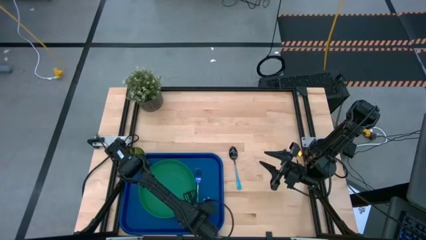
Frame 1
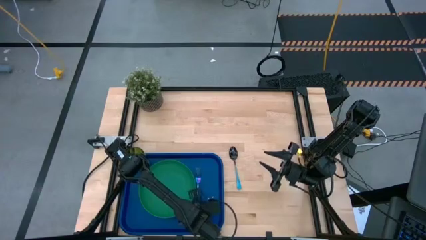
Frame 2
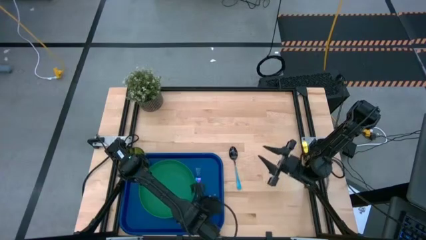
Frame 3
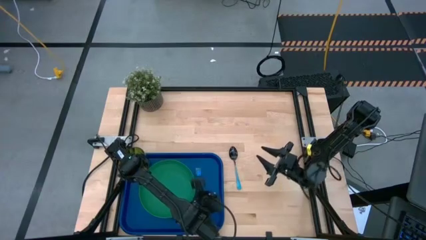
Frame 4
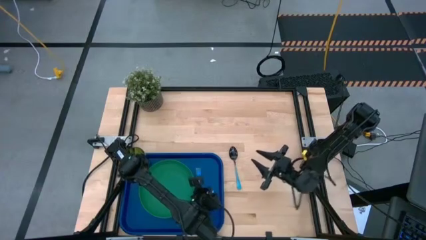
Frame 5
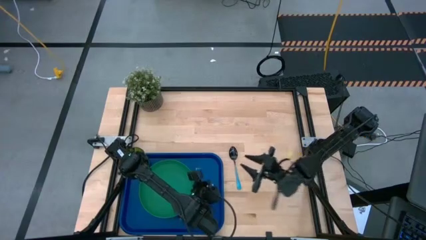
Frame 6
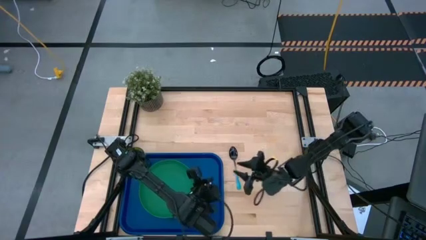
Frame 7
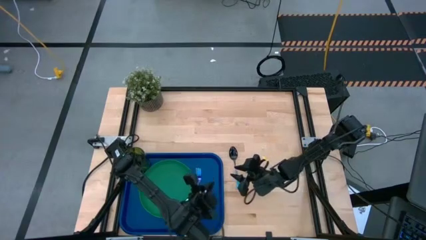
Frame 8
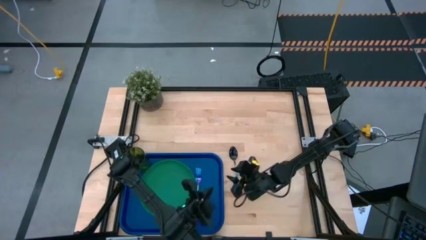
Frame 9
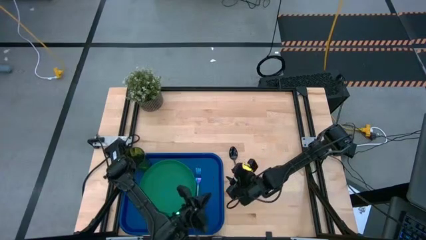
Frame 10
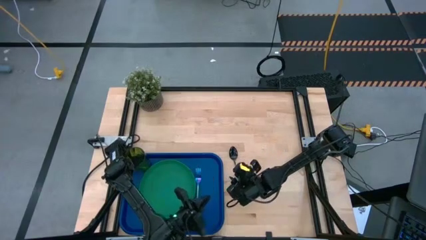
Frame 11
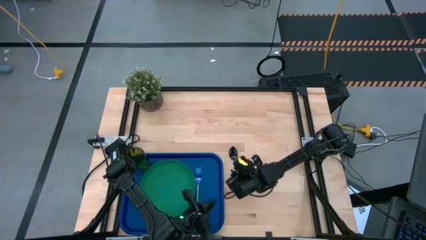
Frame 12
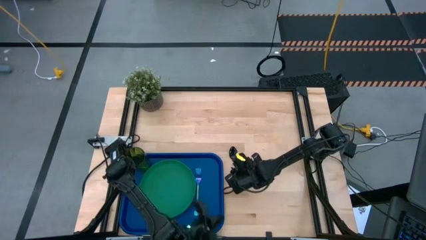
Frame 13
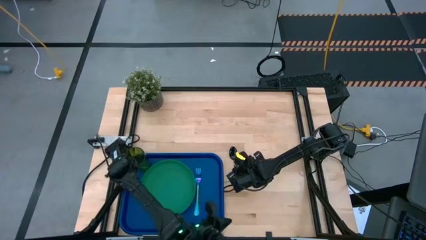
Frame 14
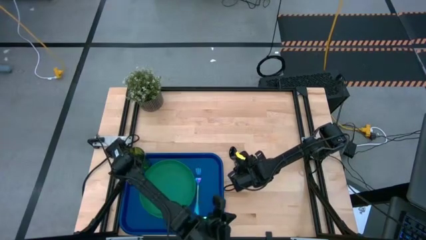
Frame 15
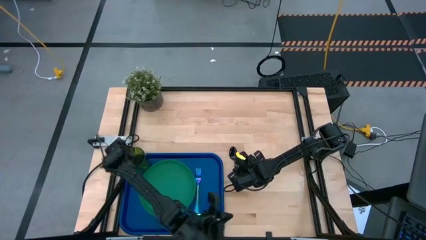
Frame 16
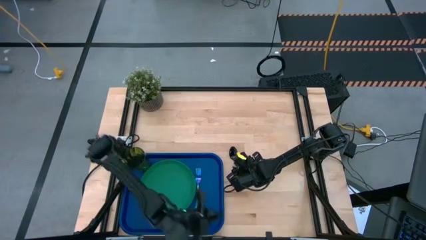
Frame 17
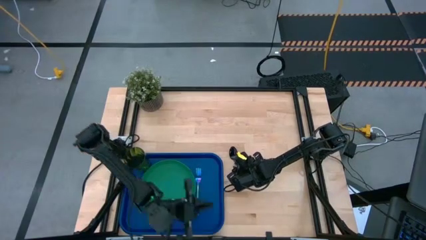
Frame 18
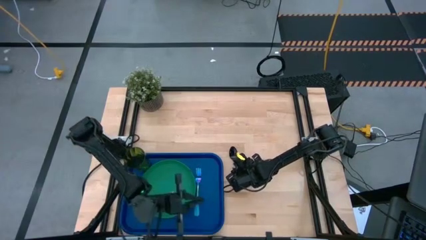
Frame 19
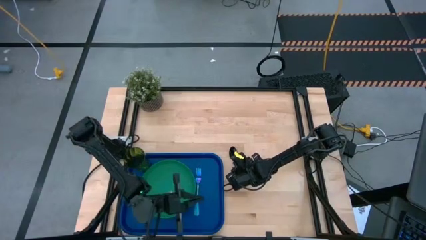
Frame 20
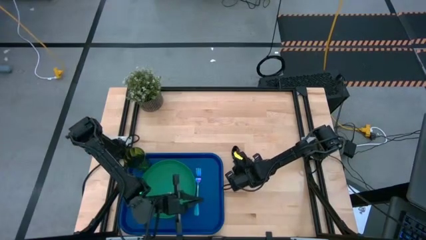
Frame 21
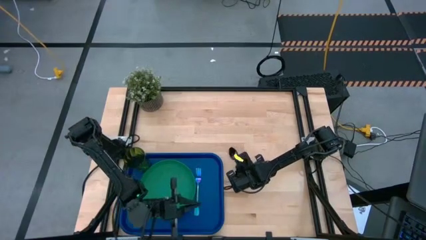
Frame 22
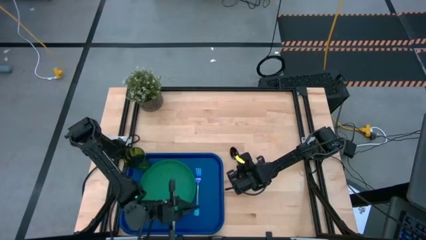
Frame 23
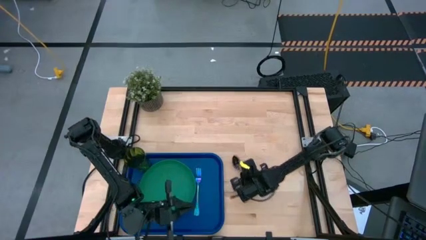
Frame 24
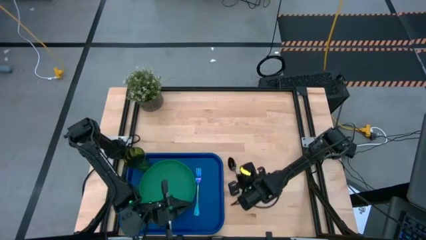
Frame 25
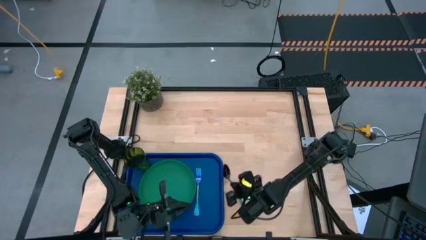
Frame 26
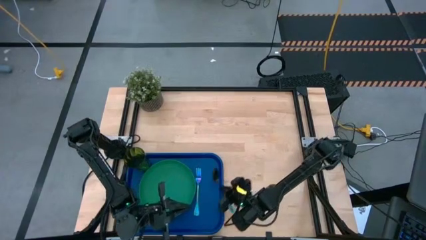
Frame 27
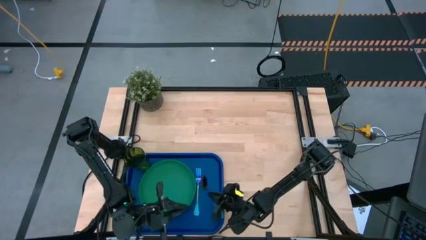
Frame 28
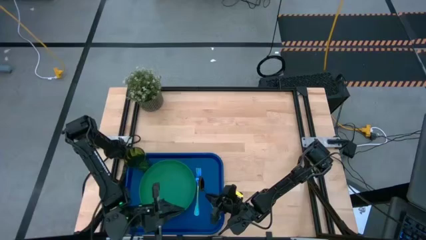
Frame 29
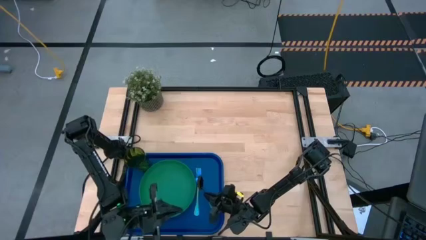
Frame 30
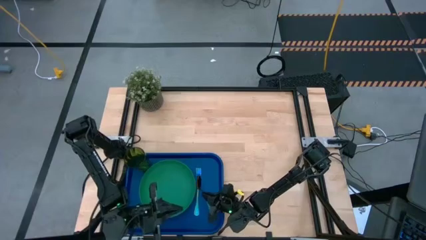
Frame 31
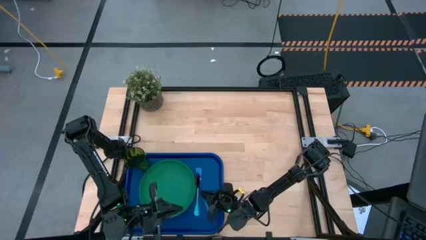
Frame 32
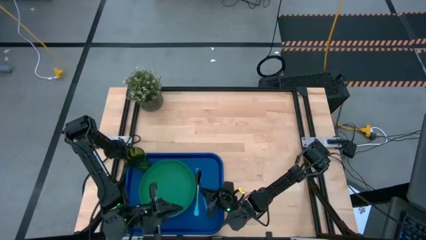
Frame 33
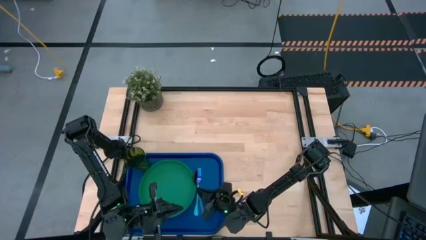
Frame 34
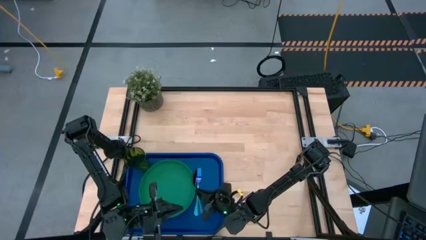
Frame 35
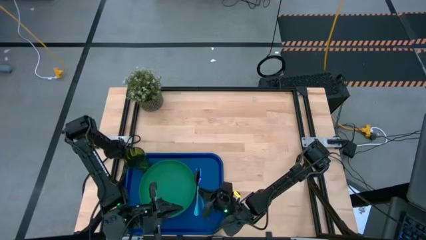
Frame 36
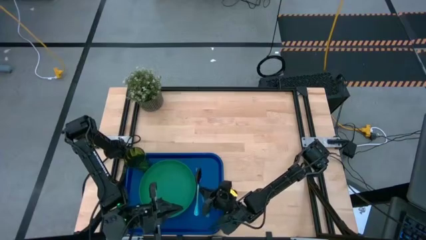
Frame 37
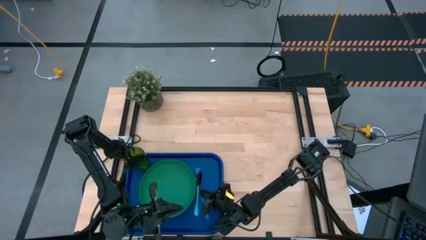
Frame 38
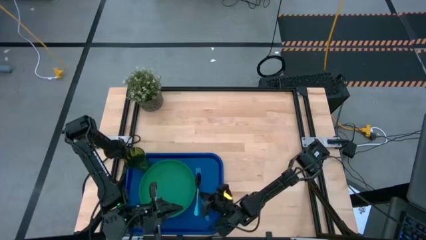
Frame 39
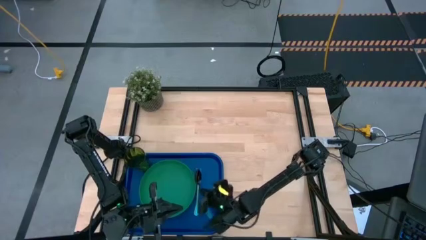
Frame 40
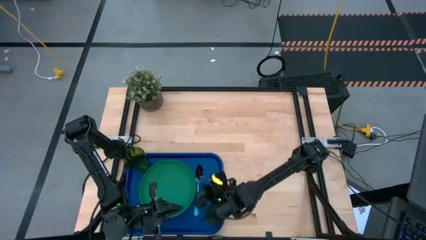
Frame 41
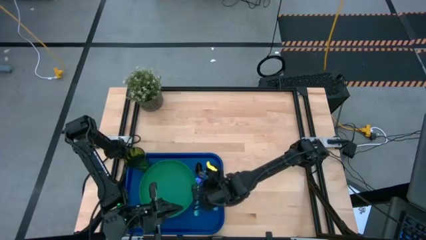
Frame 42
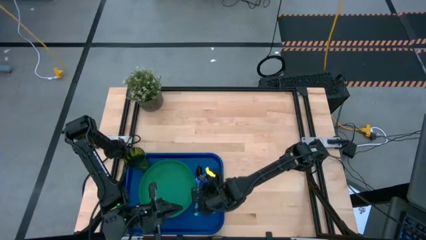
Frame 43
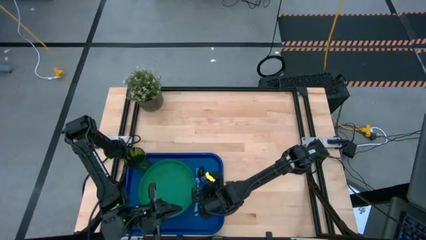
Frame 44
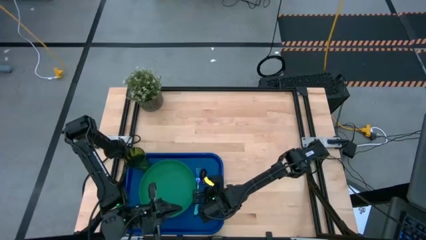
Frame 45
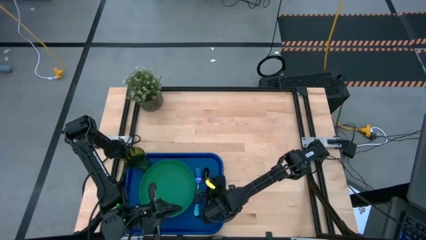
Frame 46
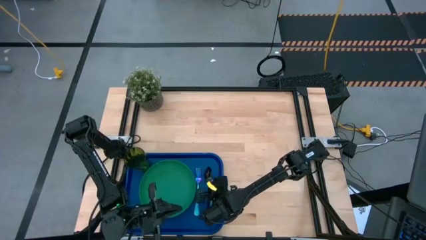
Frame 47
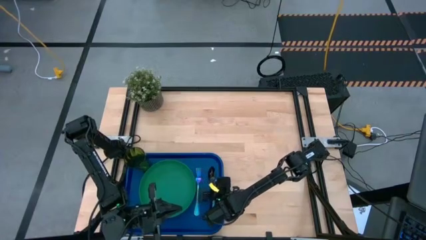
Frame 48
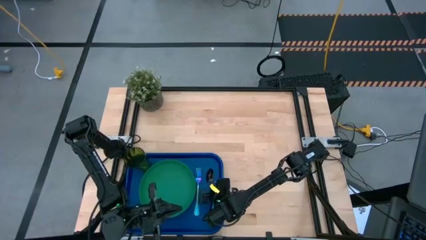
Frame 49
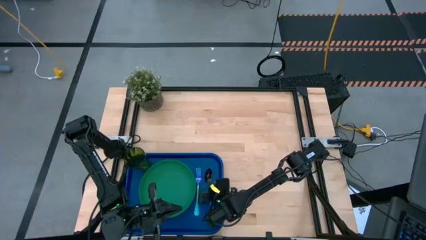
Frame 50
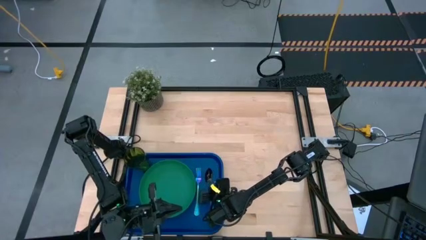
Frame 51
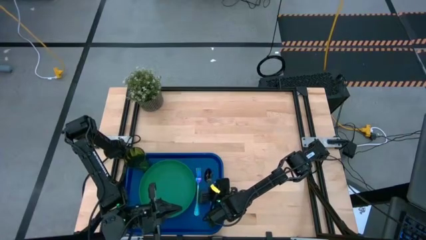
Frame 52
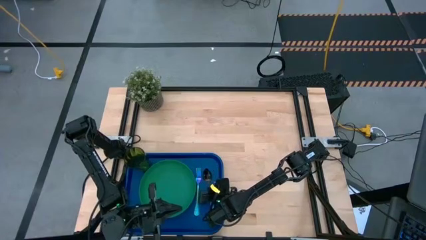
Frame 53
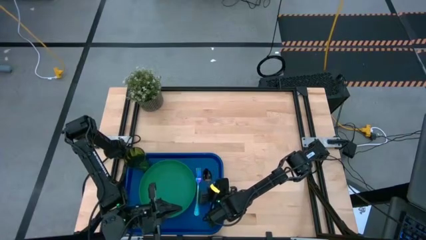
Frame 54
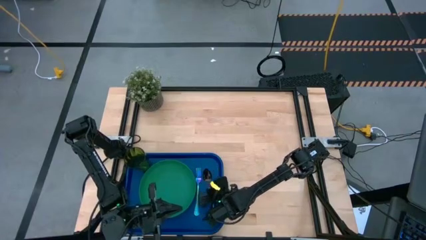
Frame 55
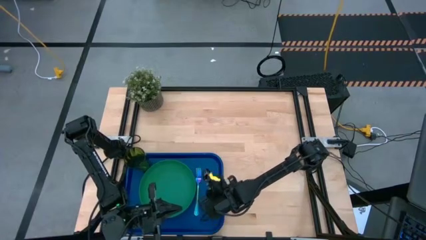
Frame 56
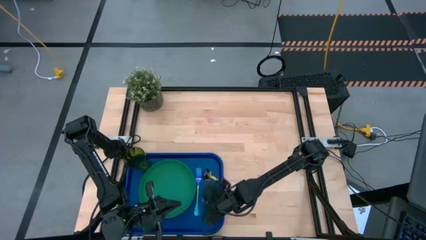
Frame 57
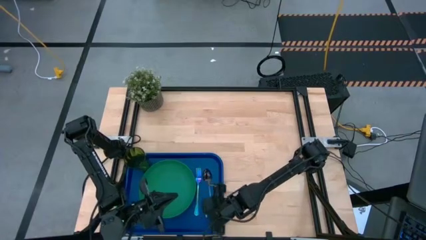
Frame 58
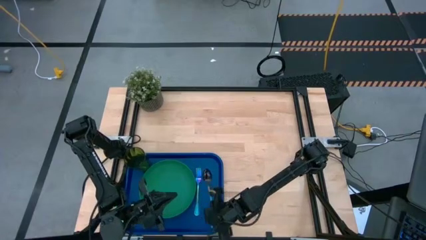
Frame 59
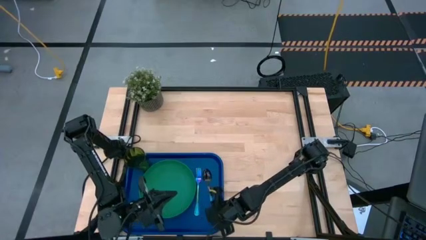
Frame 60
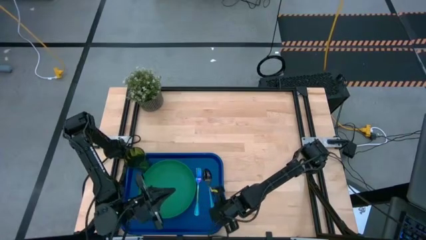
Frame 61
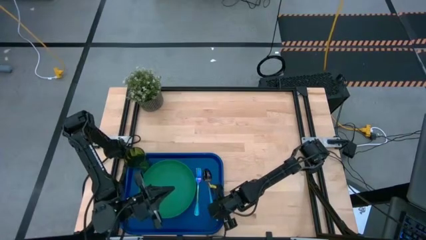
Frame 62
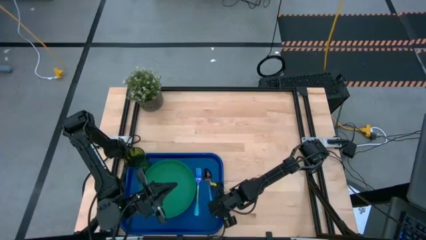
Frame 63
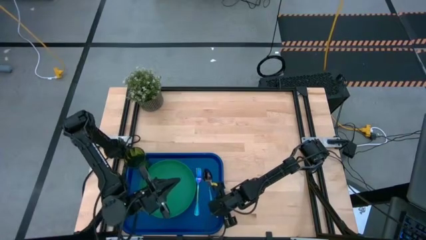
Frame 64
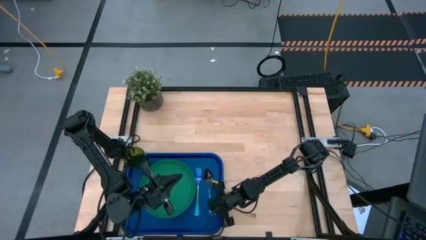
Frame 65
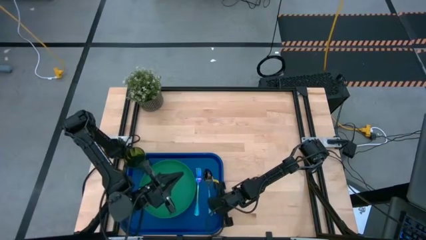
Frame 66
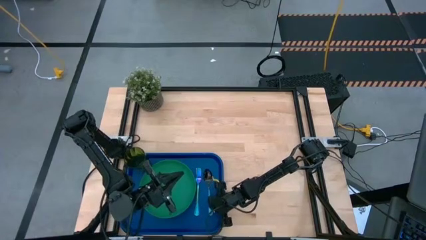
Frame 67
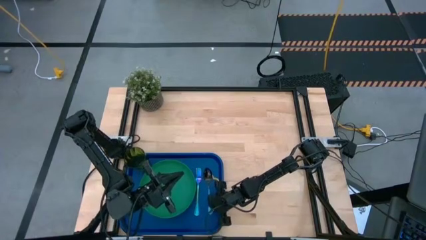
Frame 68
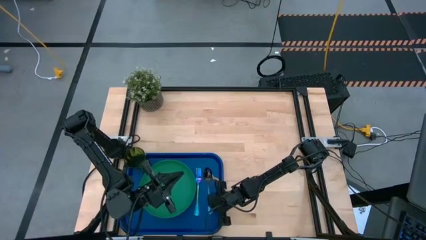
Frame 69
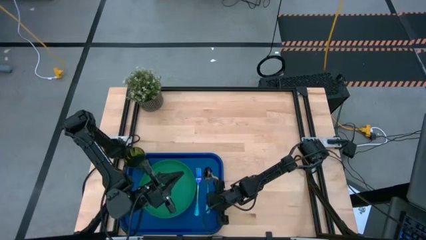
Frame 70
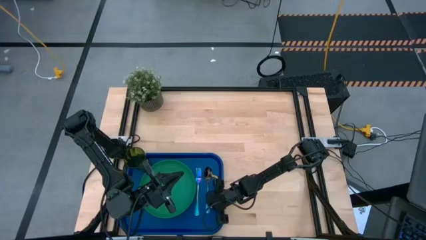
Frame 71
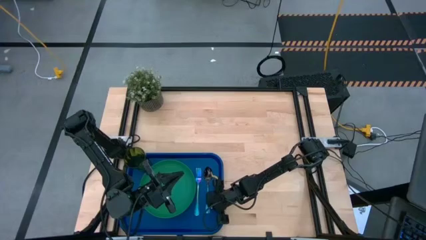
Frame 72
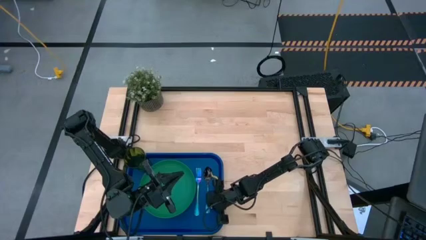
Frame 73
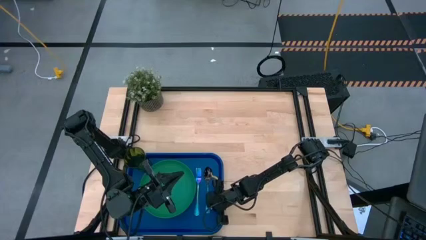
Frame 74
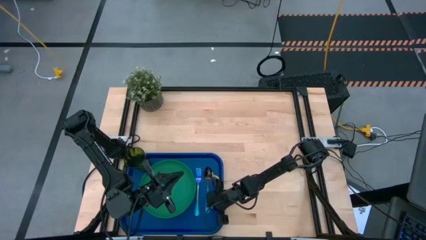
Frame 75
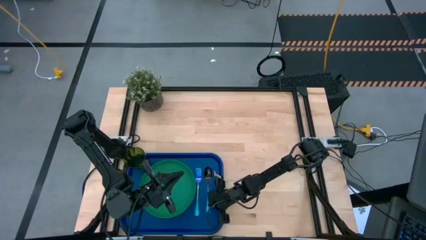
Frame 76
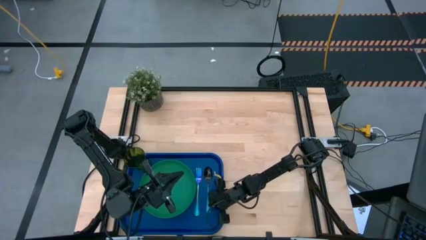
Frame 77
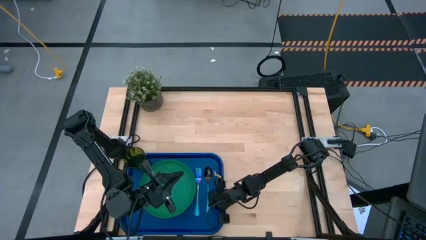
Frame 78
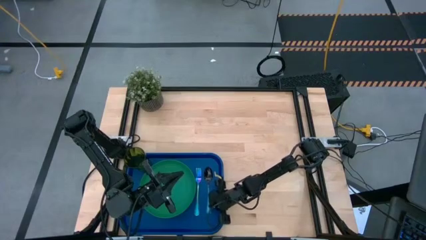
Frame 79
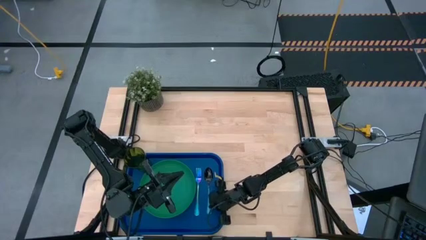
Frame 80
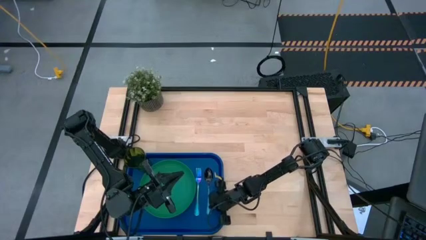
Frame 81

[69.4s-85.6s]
Task: Pick and place plate/cup/fork/spoon on tray
Put the blue spoon to the right of the blue fork on the dark blue tray
